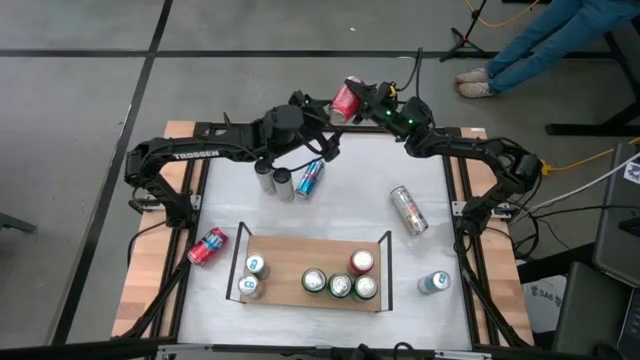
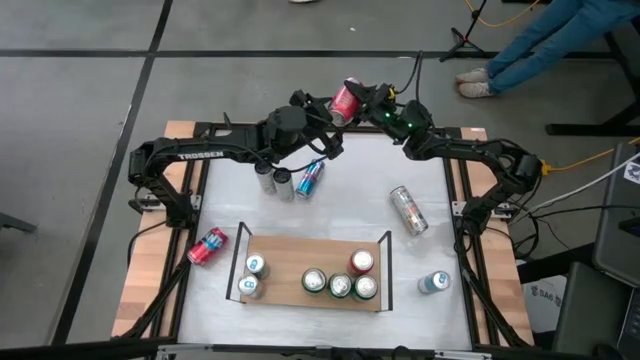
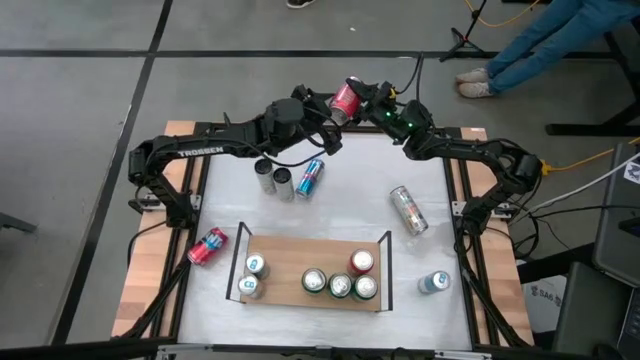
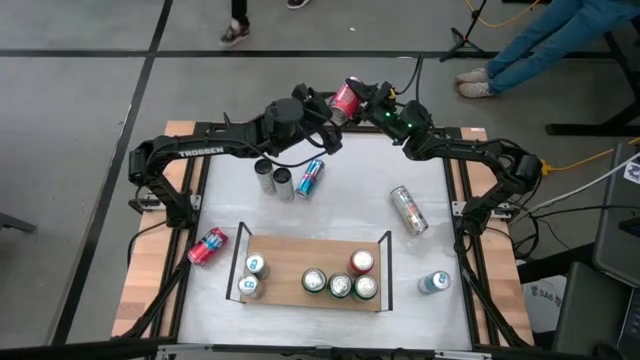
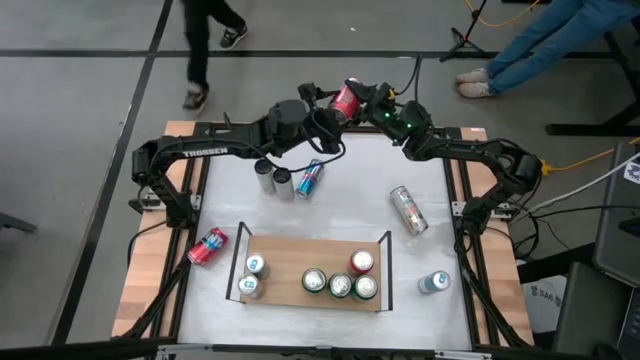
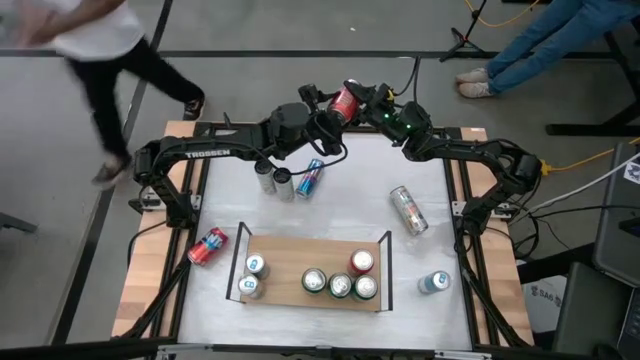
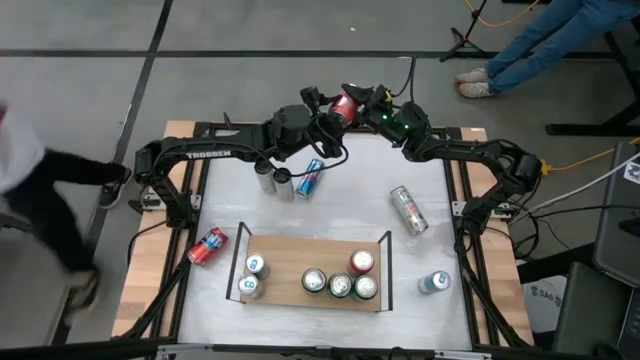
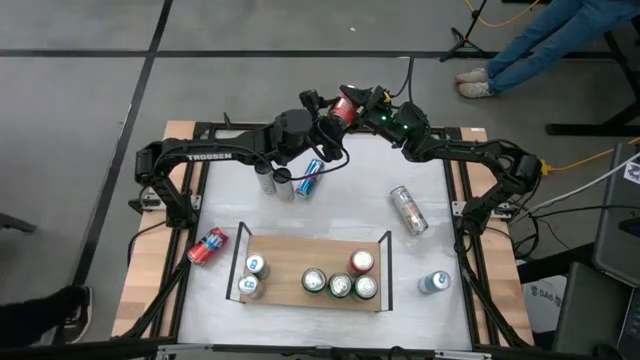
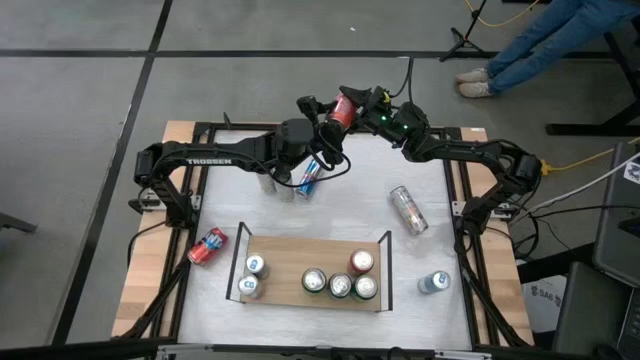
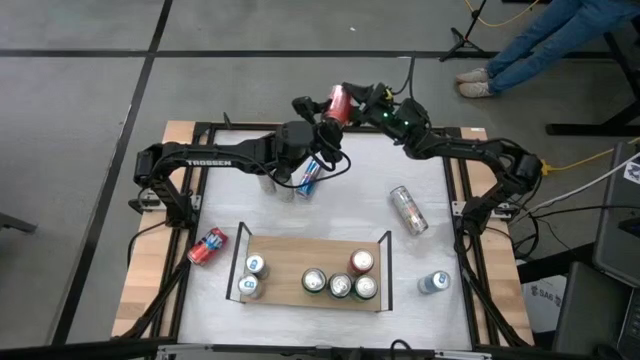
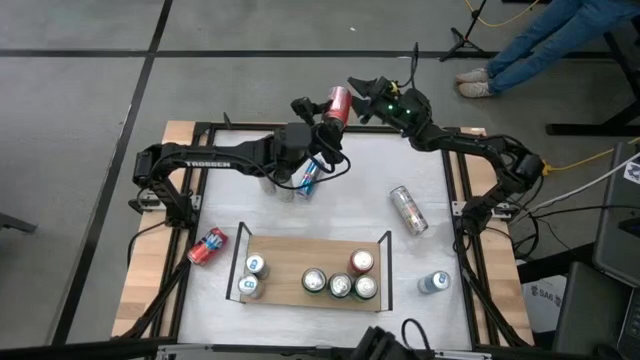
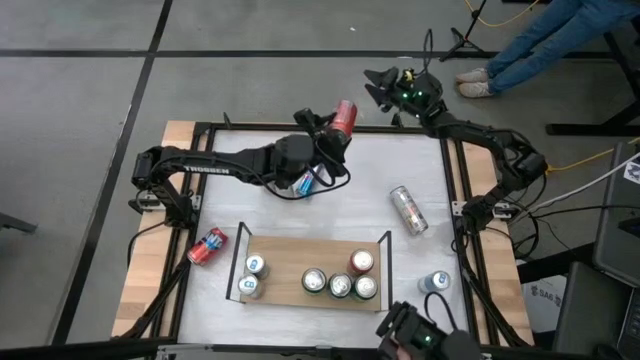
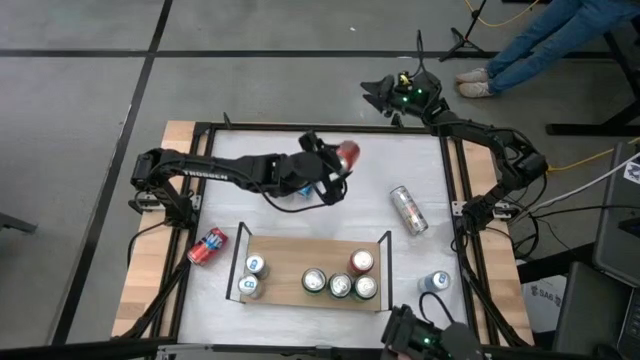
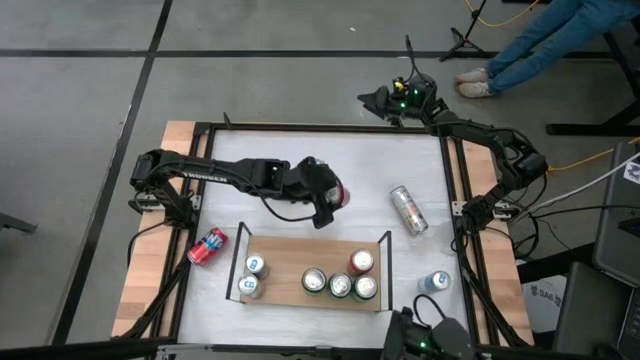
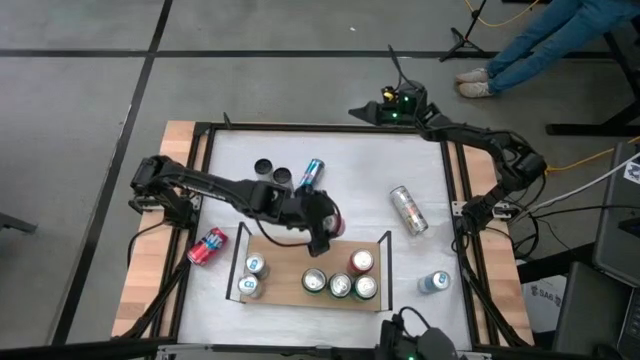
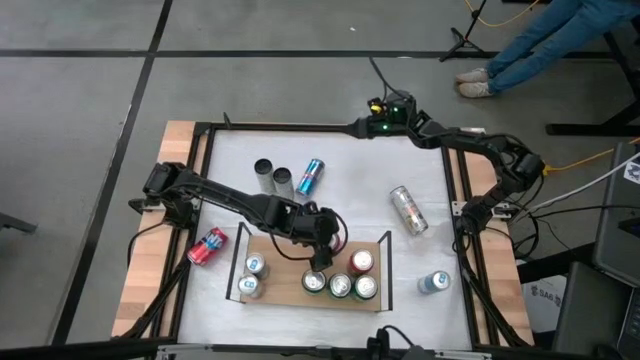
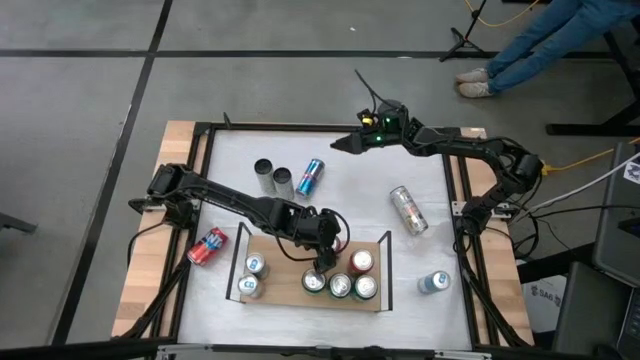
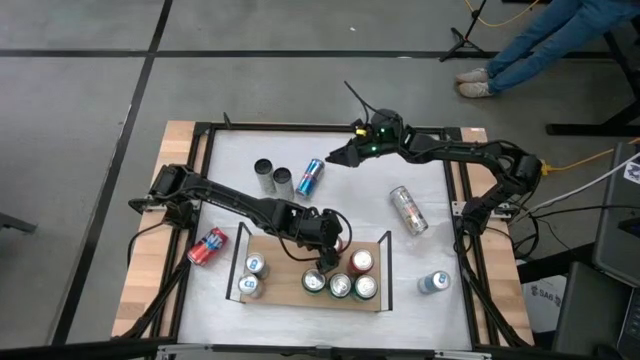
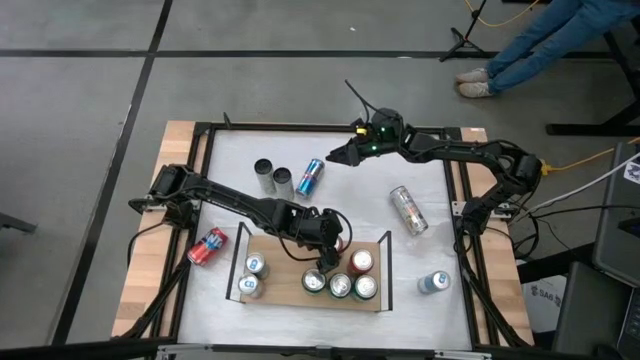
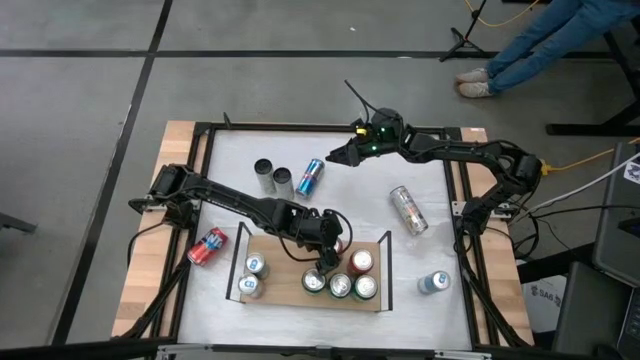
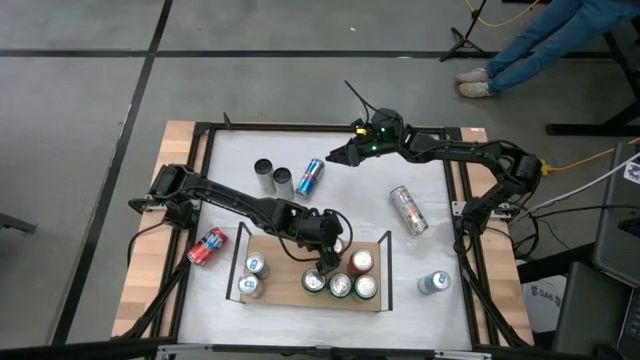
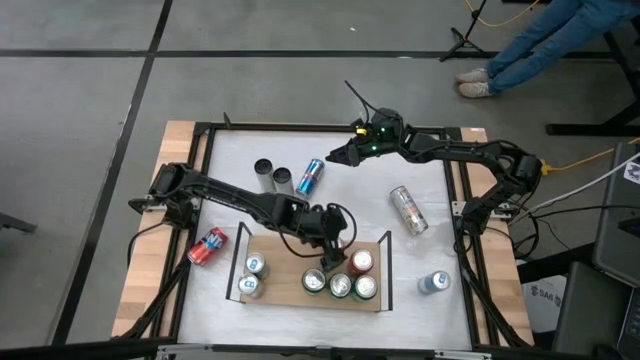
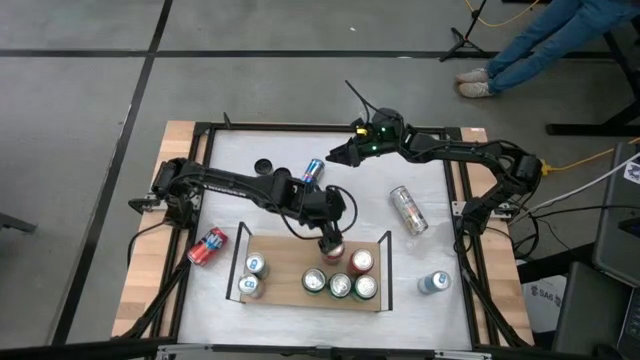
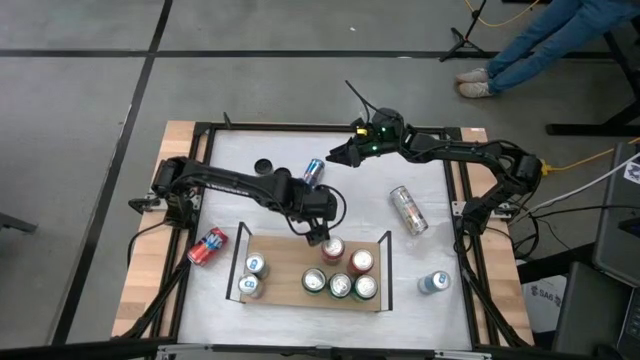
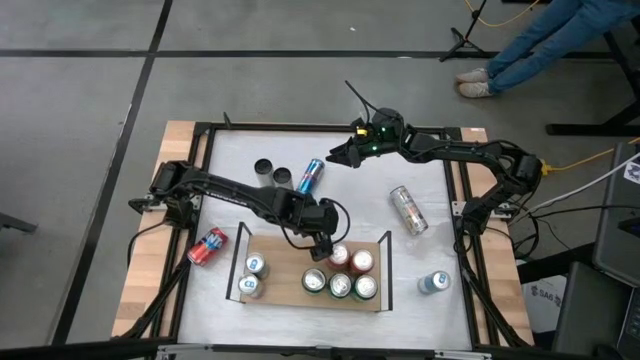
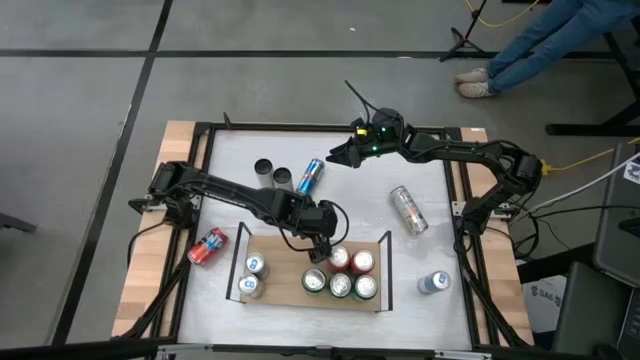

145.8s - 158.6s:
Task: Place canned beverage on shelf
Put the right red soda can on the shelf aligned with the other red soda can

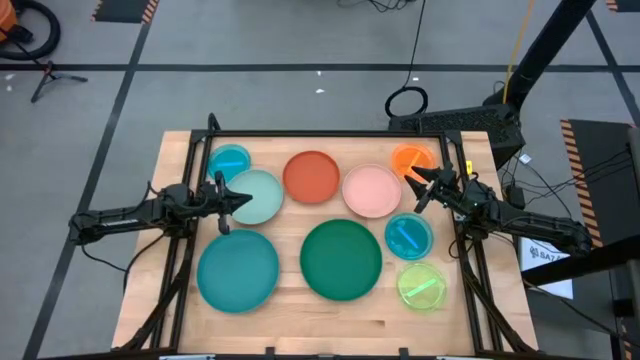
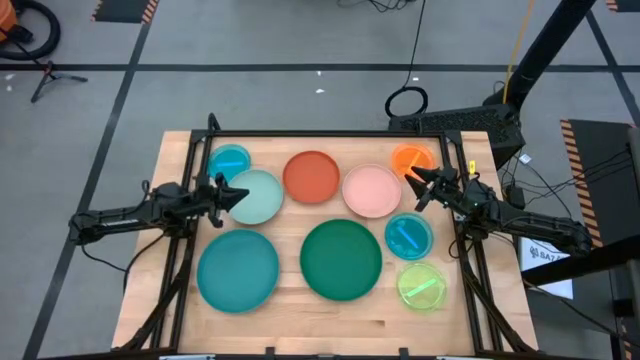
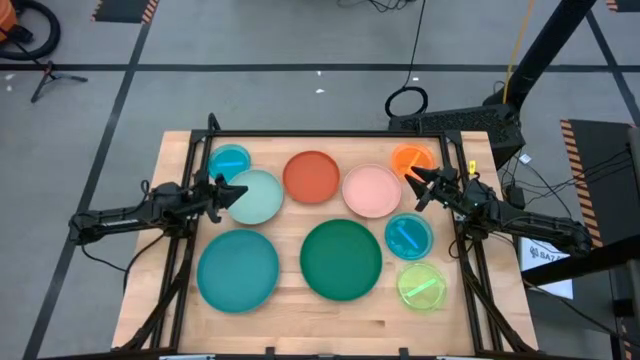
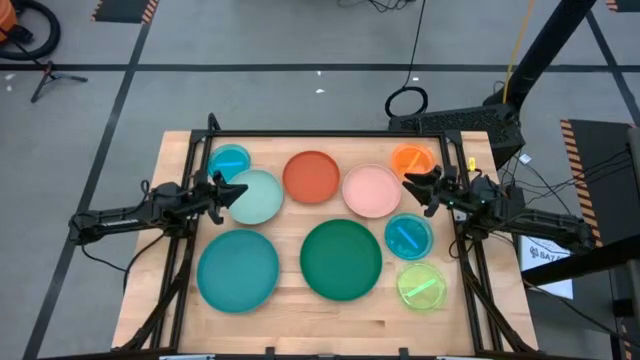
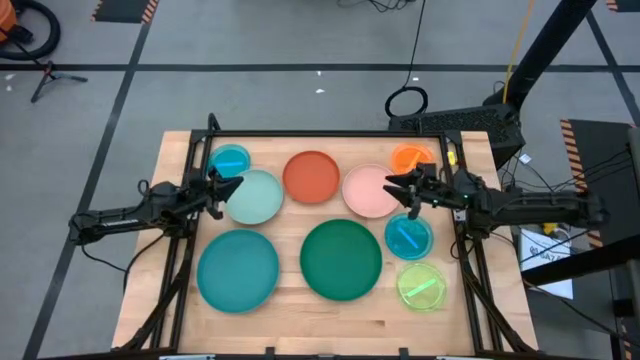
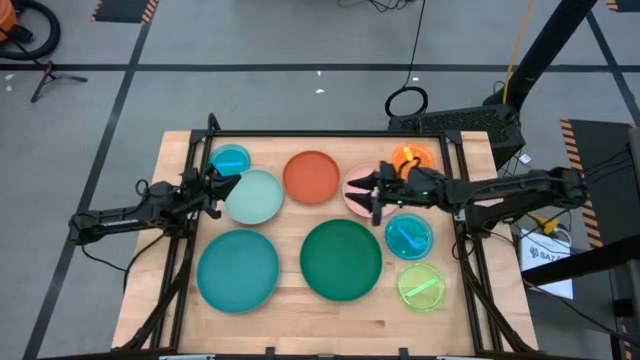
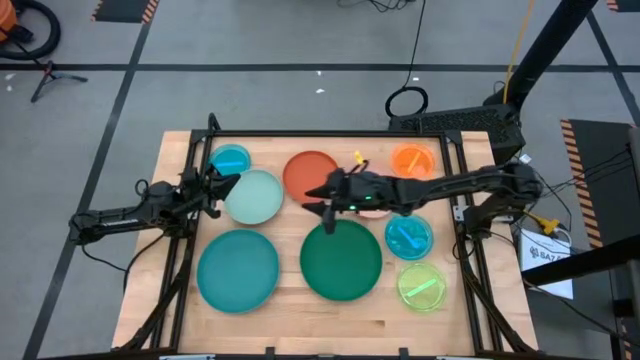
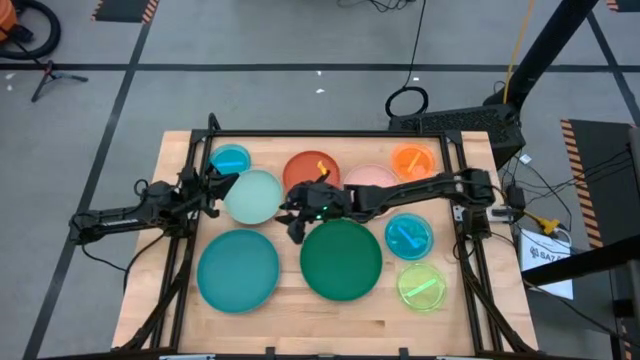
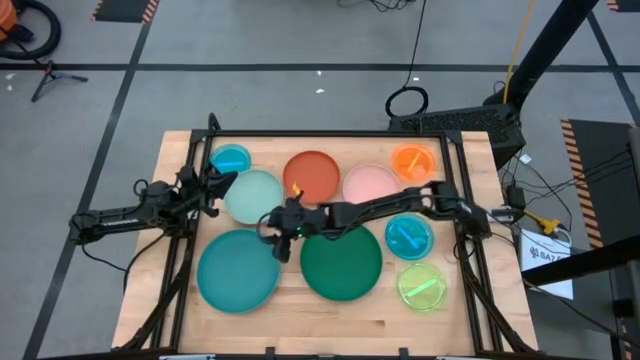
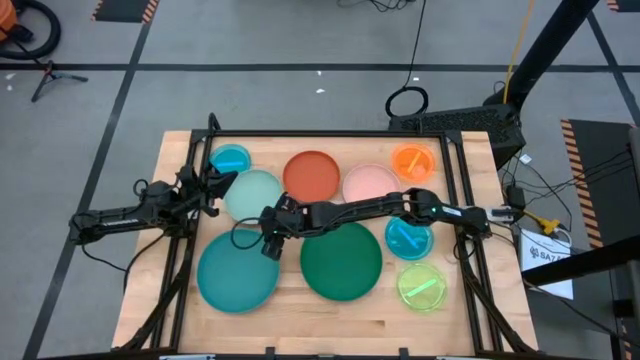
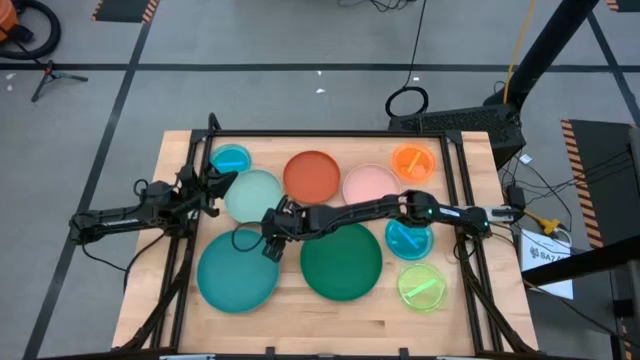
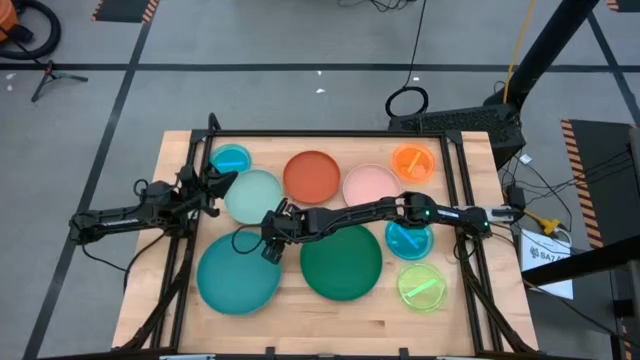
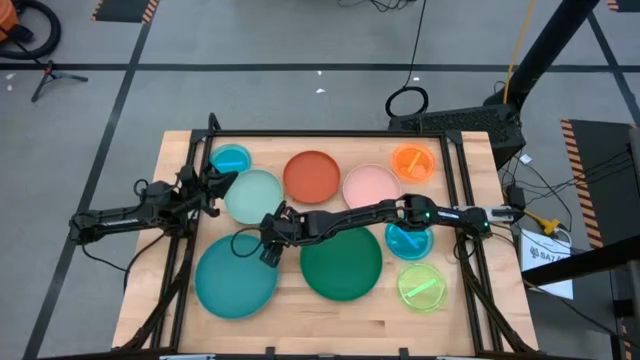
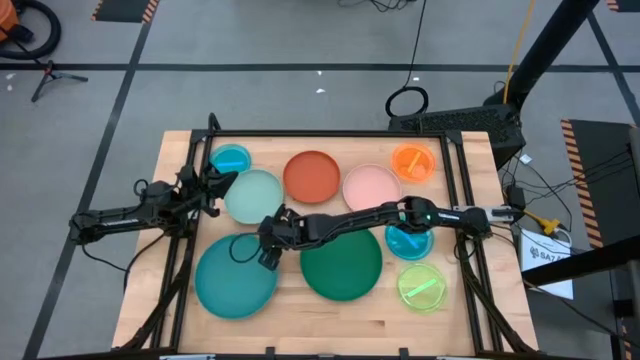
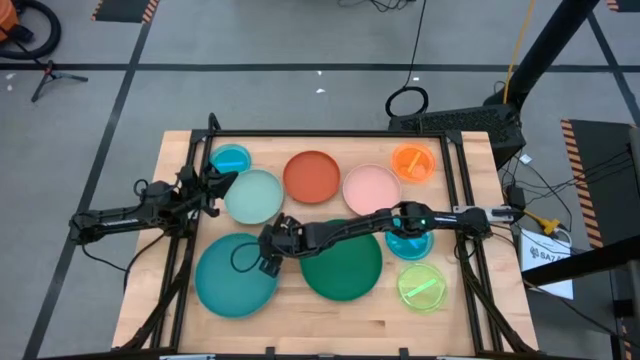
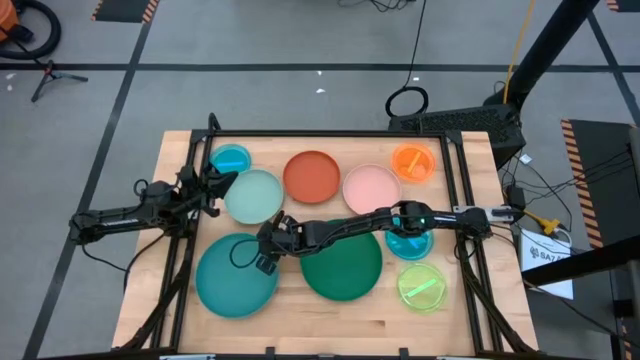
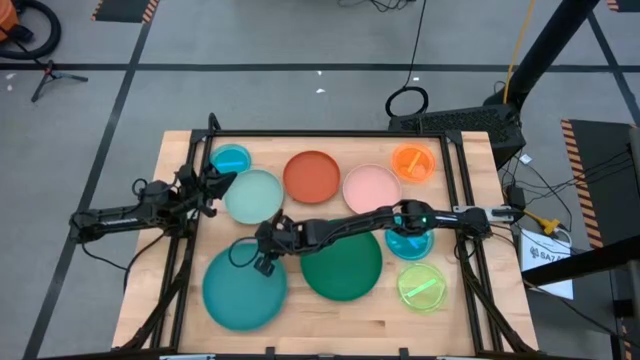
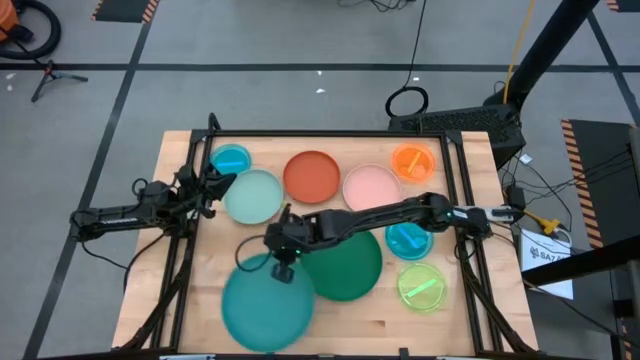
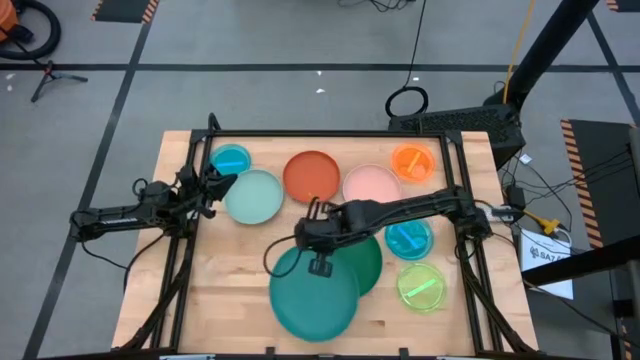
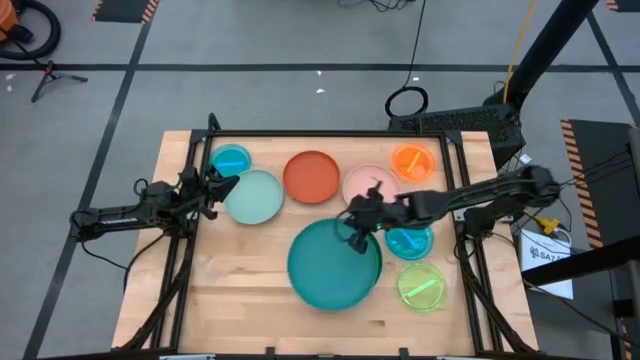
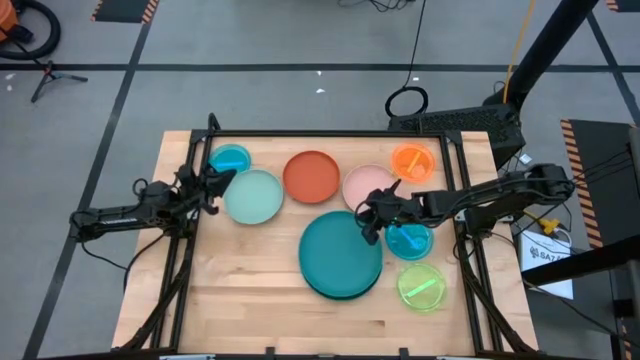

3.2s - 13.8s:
Task: Stack plastic plates
Stack the blue plate on the green plate
